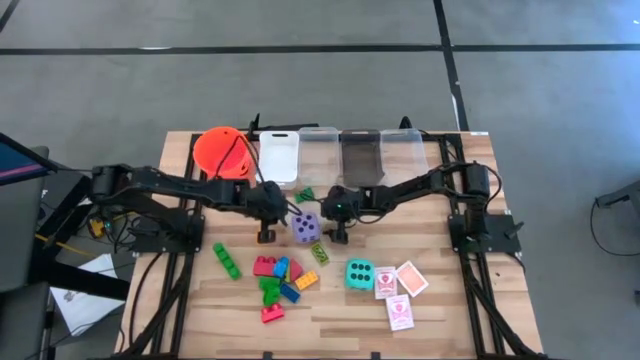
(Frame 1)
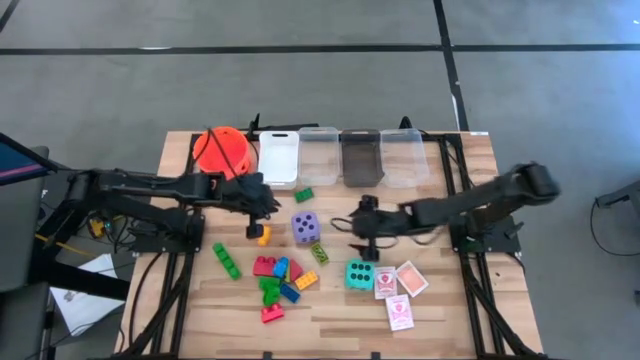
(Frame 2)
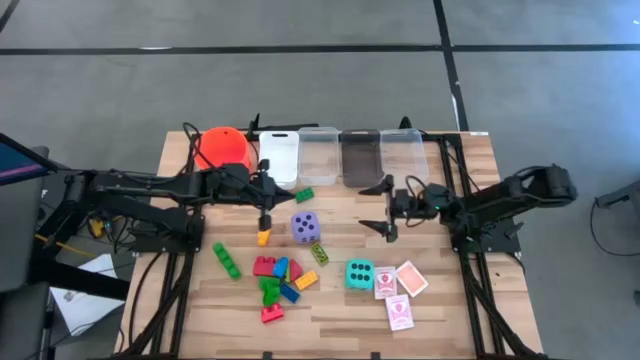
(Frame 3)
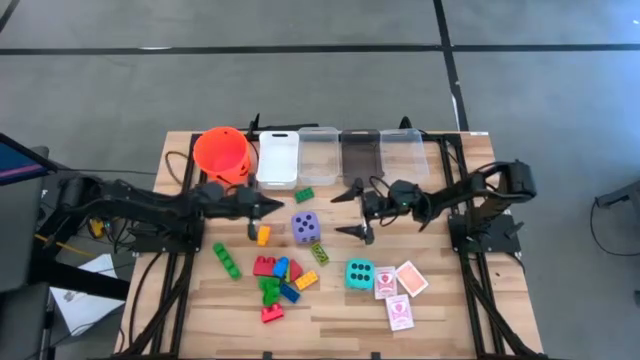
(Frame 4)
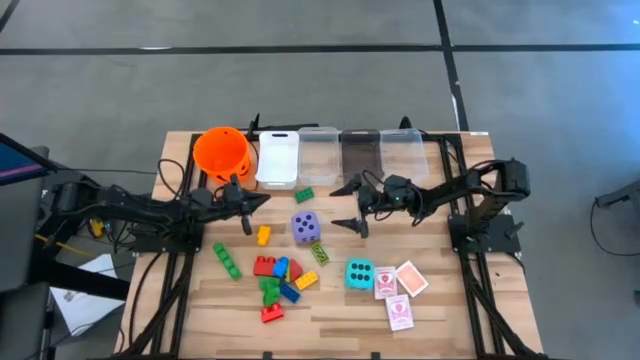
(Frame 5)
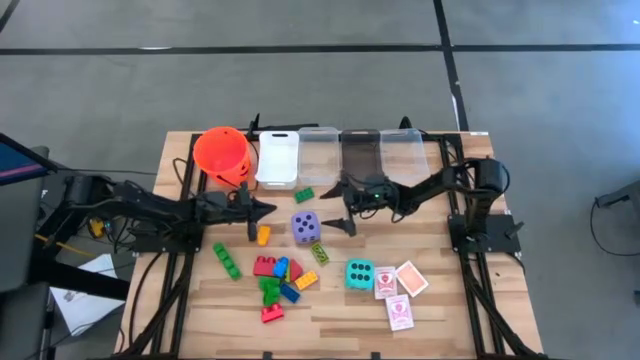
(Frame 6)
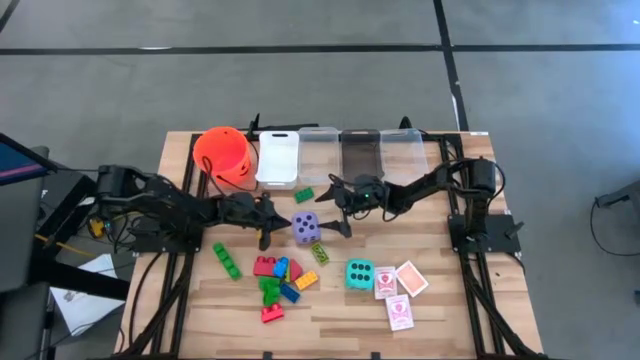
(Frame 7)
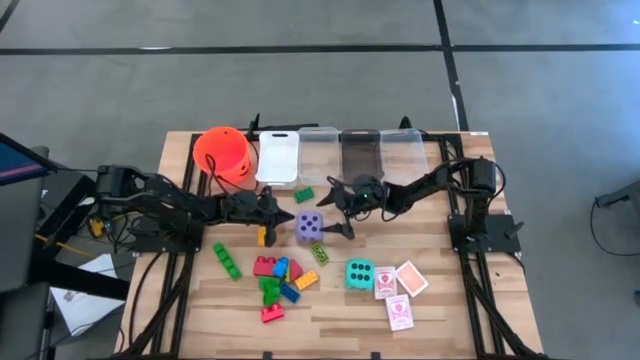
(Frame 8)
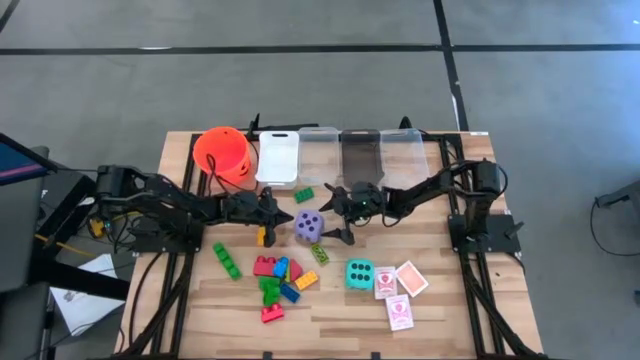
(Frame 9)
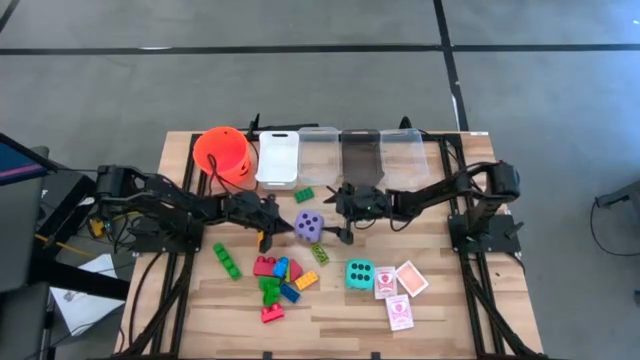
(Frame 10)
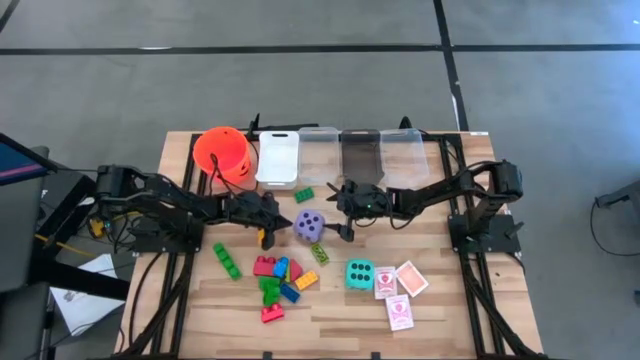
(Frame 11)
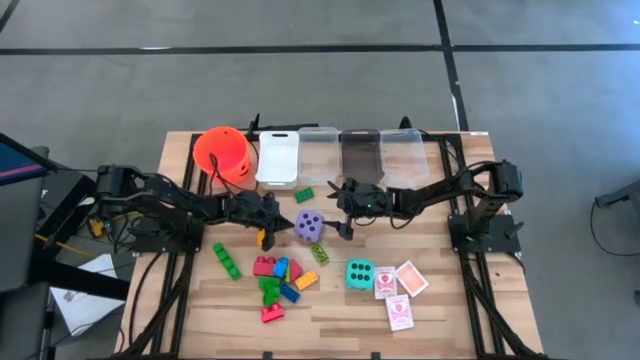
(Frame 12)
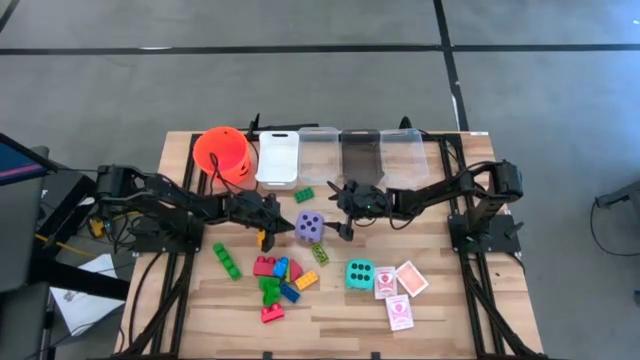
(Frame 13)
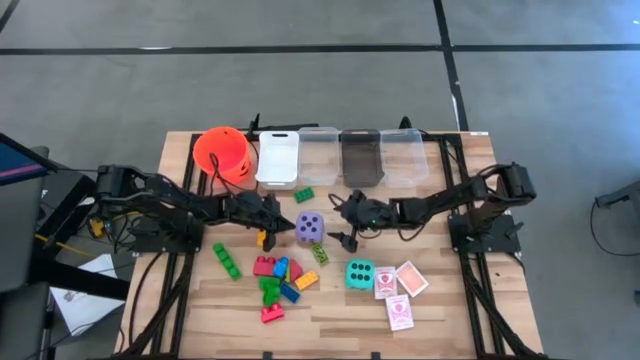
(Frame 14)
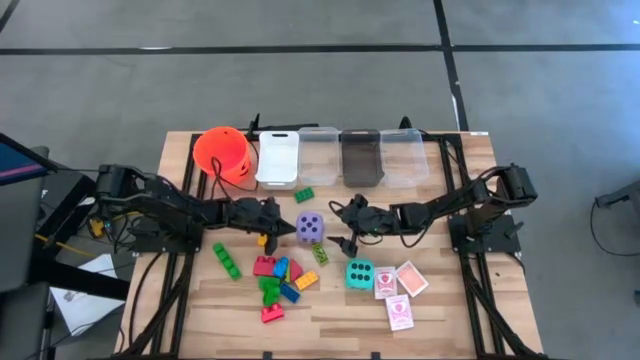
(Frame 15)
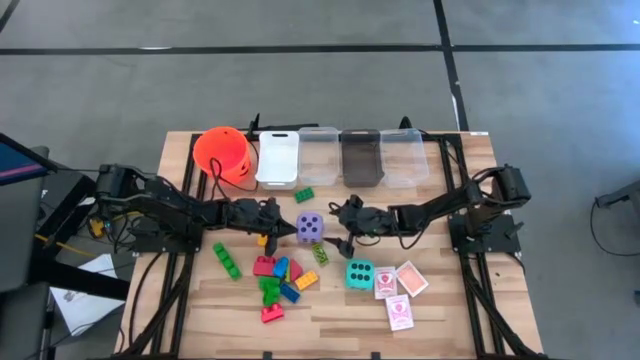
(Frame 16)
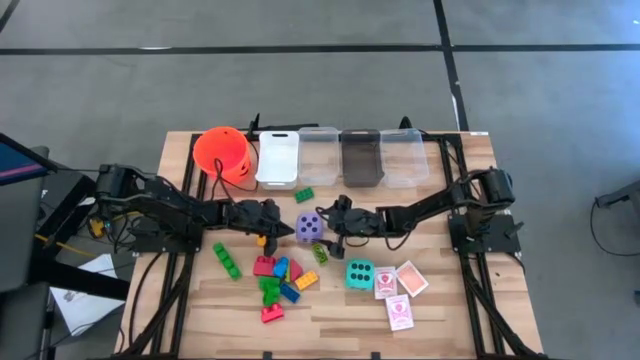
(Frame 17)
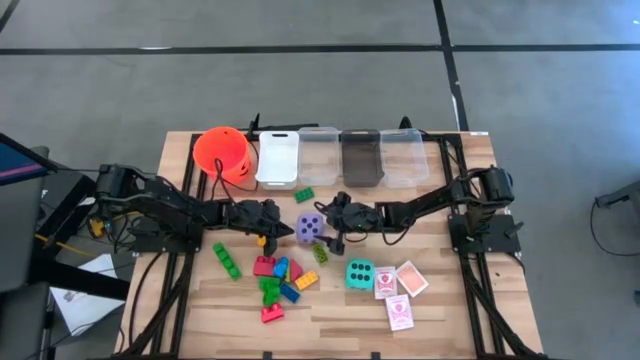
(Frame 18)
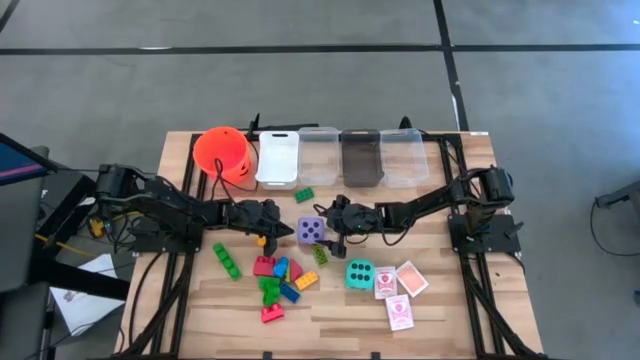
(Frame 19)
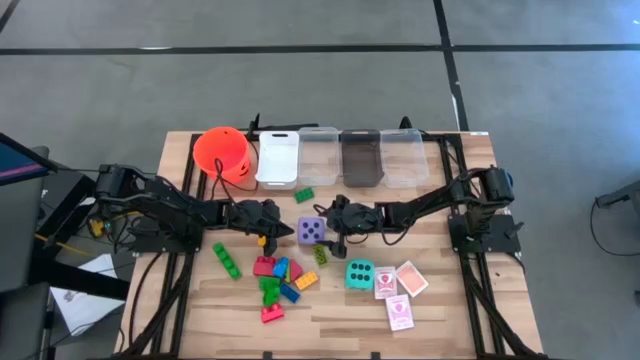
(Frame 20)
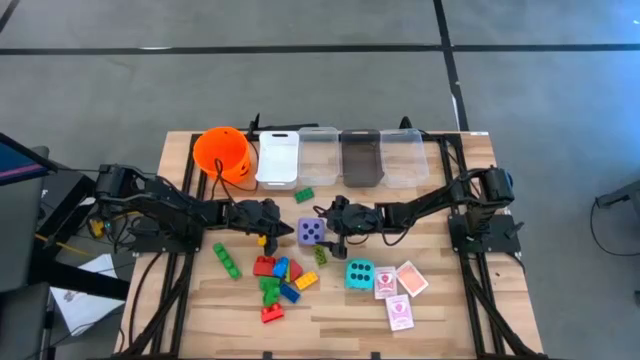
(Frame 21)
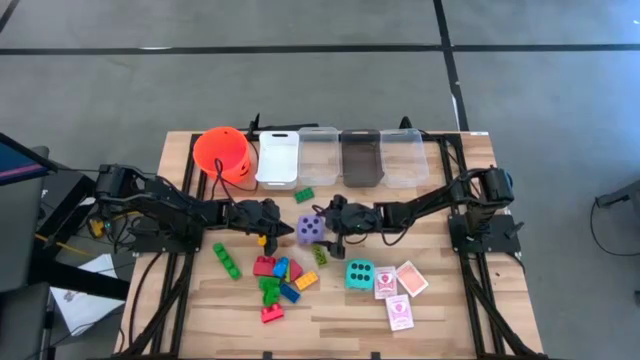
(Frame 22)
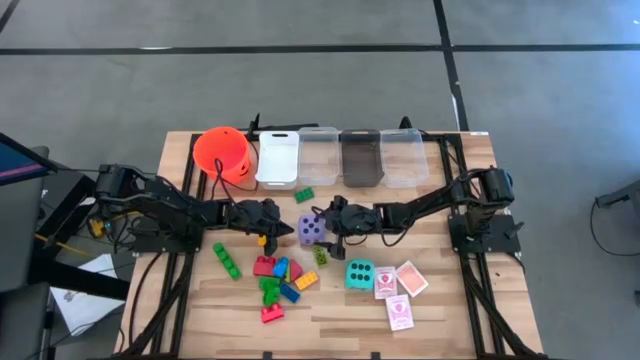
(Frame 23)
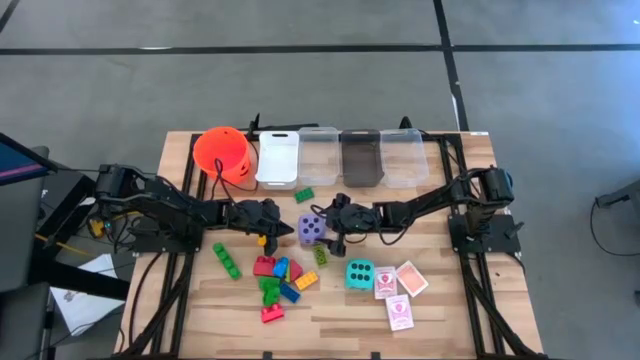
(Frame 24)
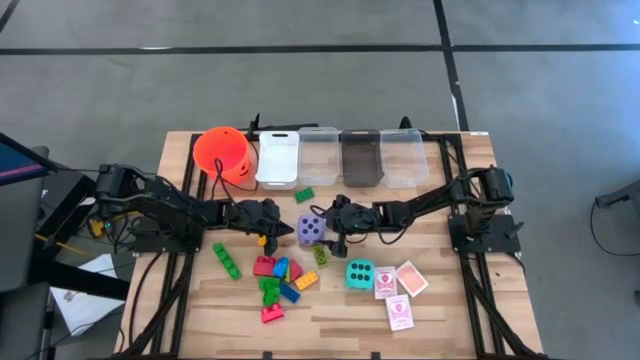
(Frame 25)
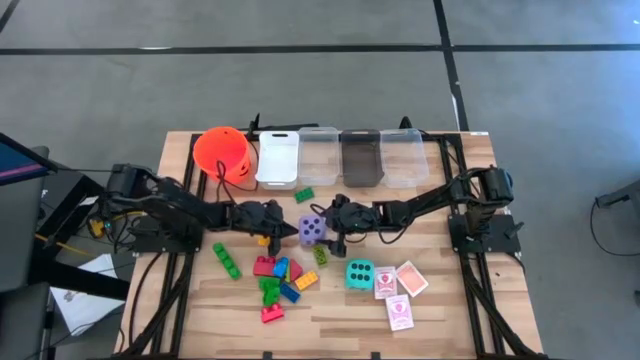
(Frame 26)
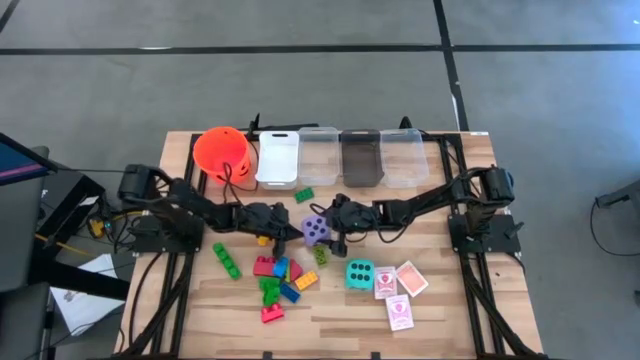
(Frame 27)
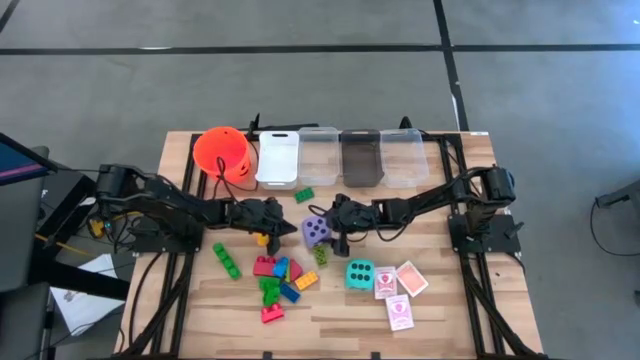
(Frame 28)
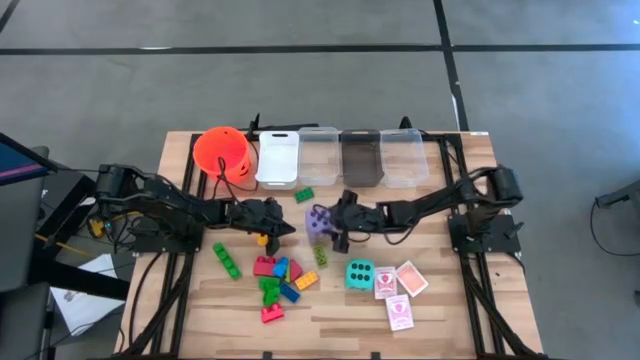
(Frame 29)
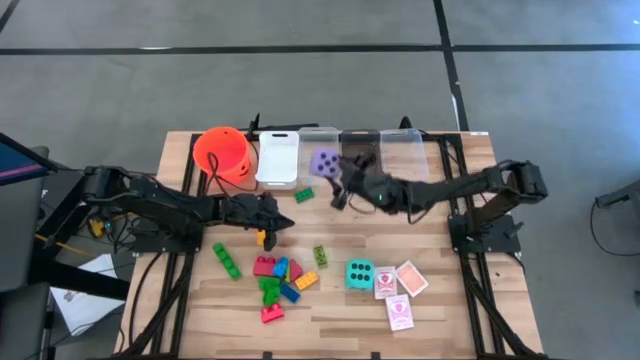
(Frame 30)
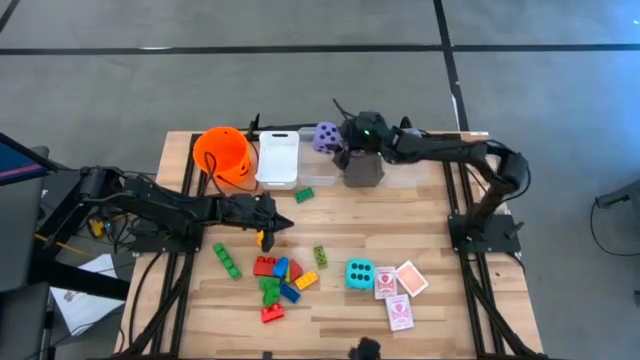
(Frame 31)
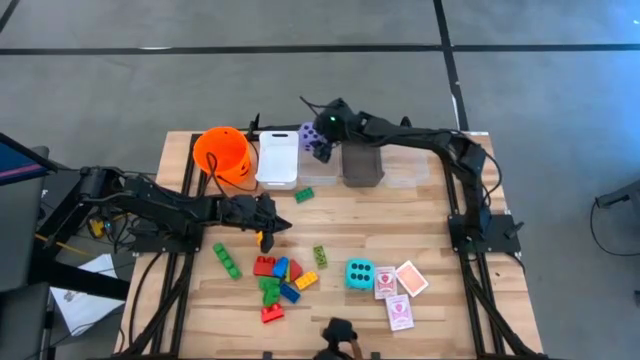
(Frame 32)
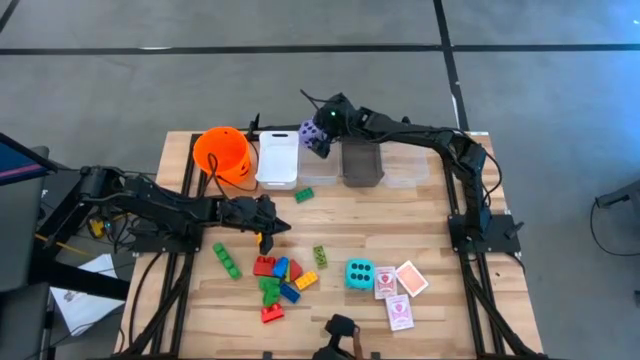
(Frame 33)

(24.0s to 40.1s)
Task: Pick & Place Toys
Put the purple dice into the left transparent bin
